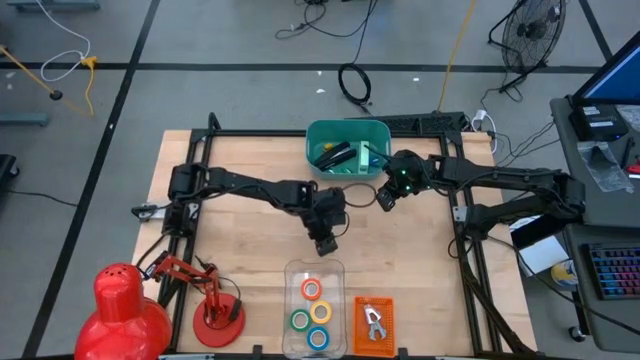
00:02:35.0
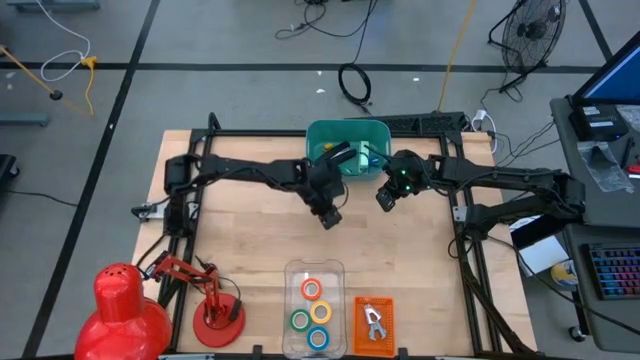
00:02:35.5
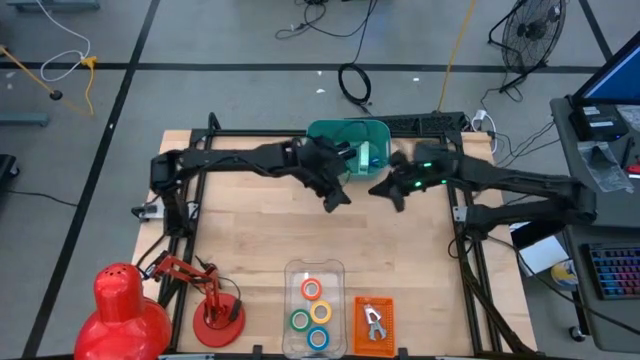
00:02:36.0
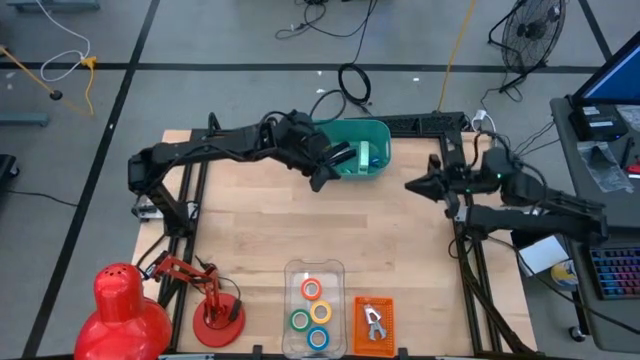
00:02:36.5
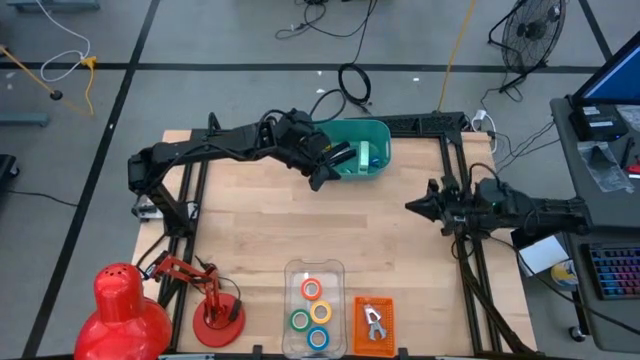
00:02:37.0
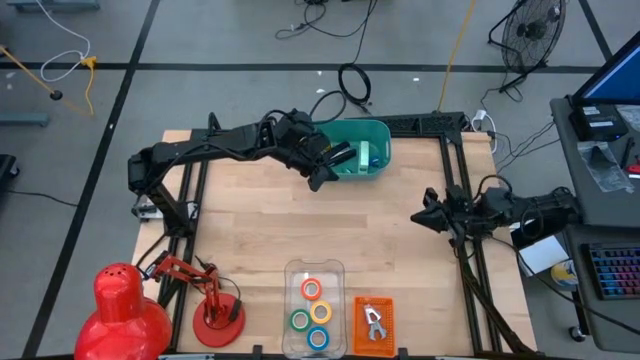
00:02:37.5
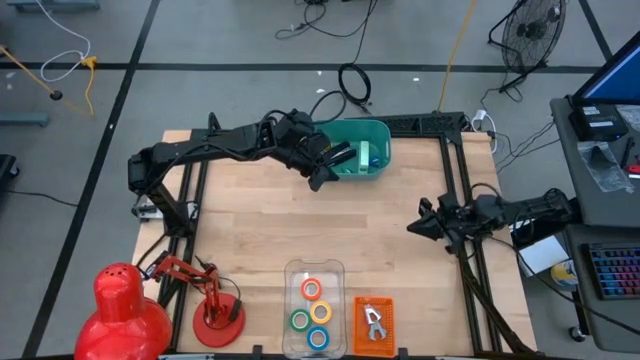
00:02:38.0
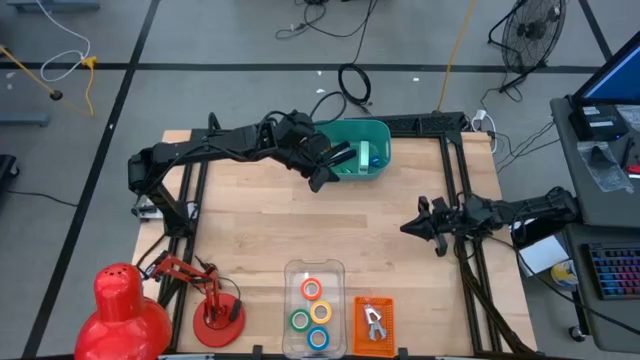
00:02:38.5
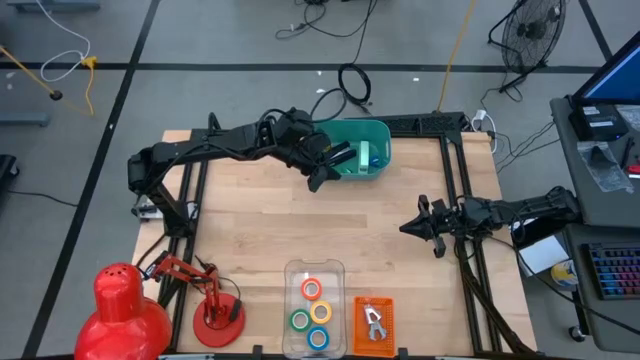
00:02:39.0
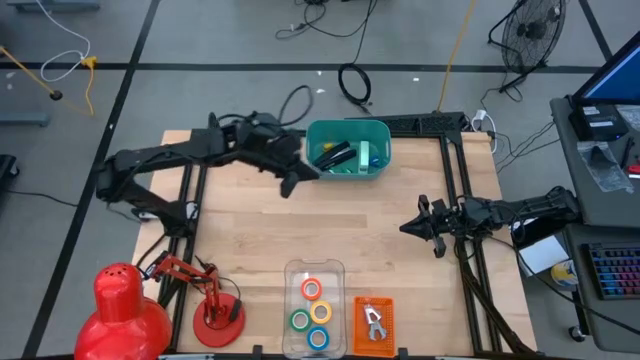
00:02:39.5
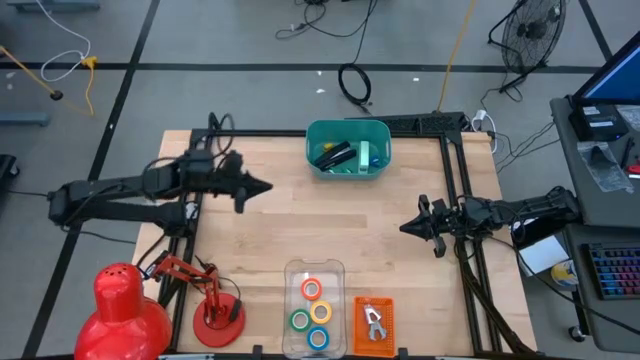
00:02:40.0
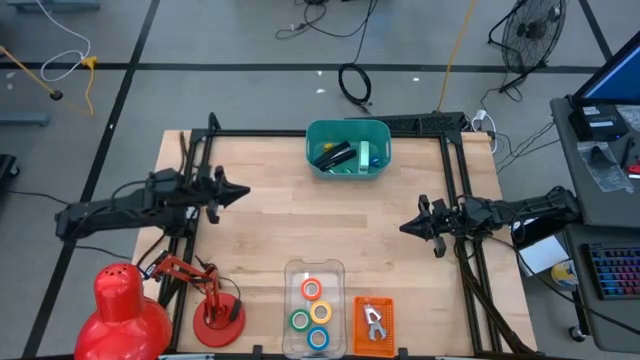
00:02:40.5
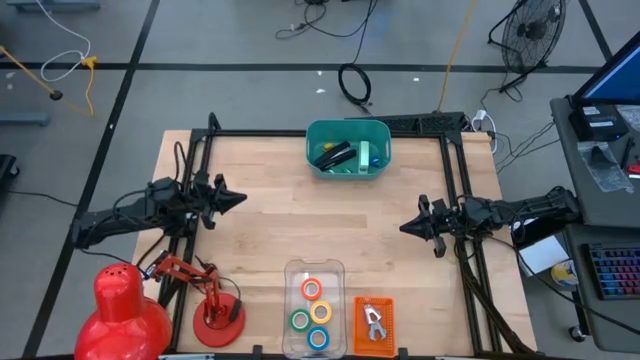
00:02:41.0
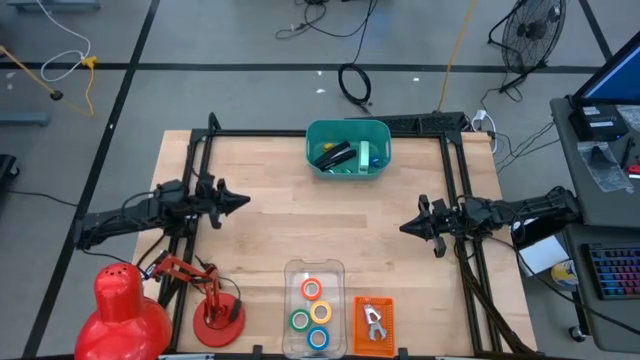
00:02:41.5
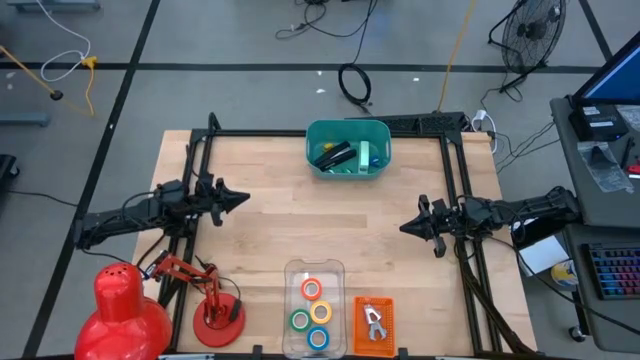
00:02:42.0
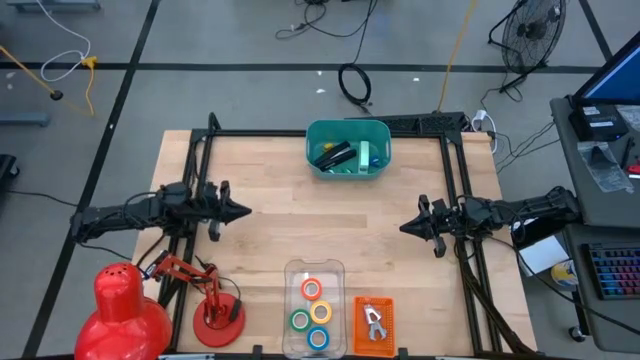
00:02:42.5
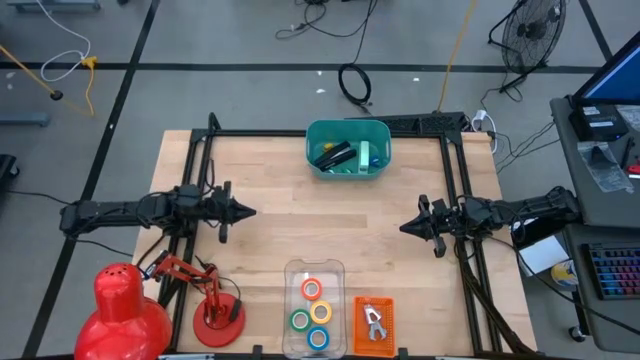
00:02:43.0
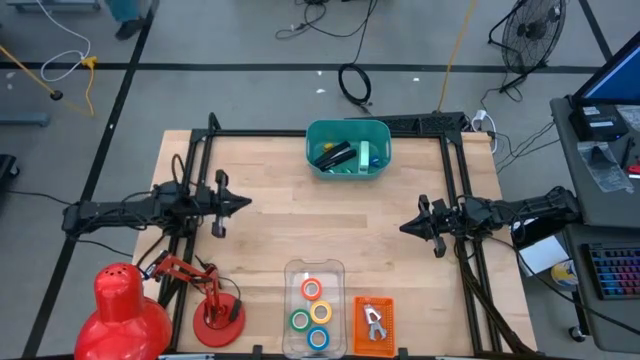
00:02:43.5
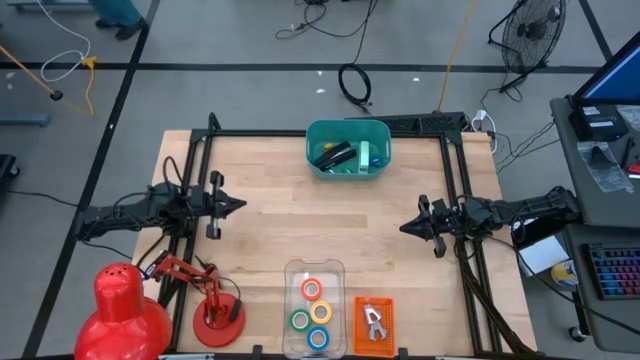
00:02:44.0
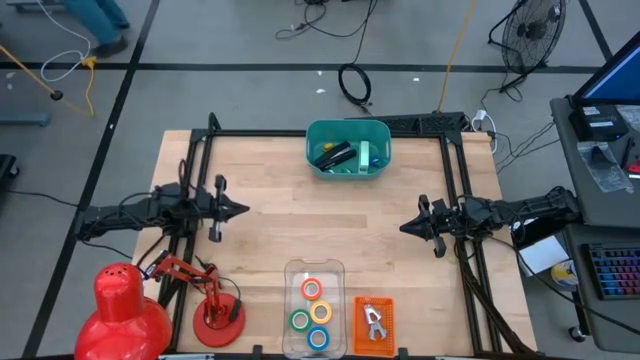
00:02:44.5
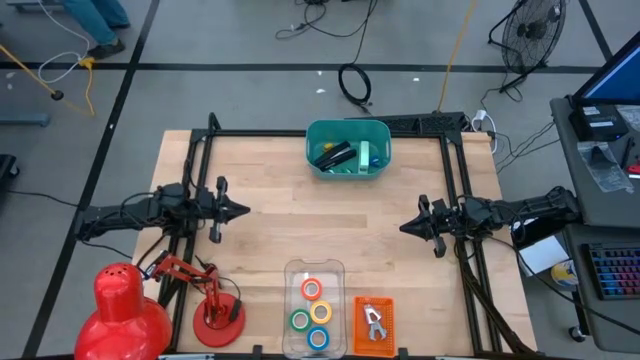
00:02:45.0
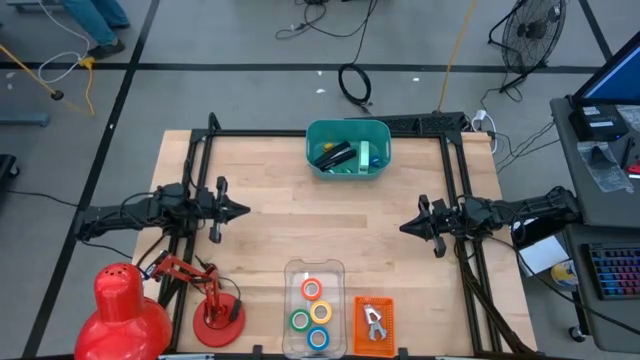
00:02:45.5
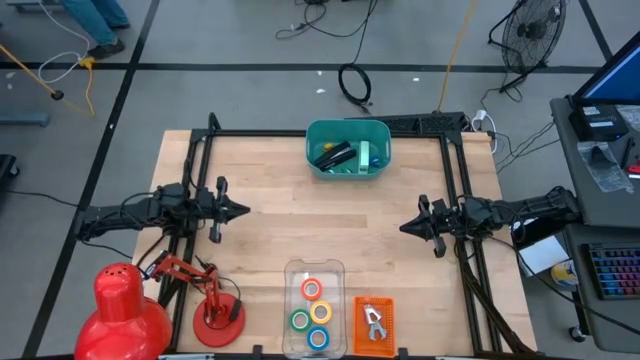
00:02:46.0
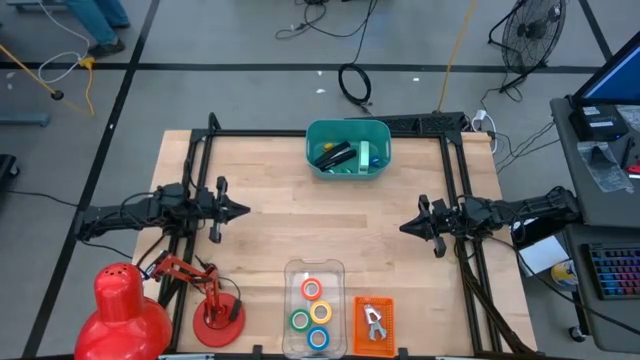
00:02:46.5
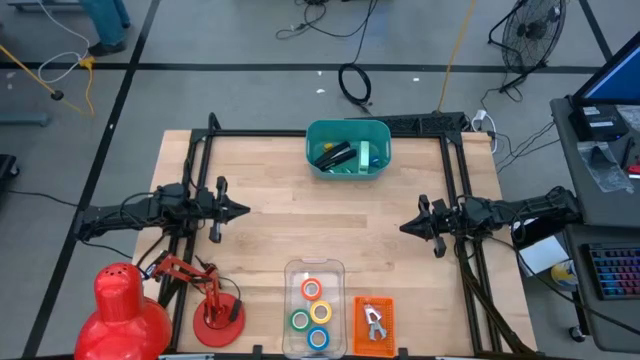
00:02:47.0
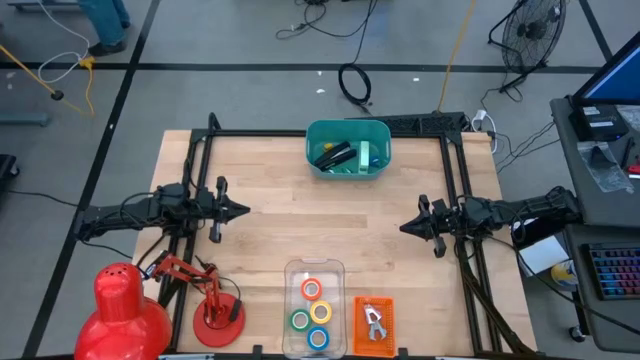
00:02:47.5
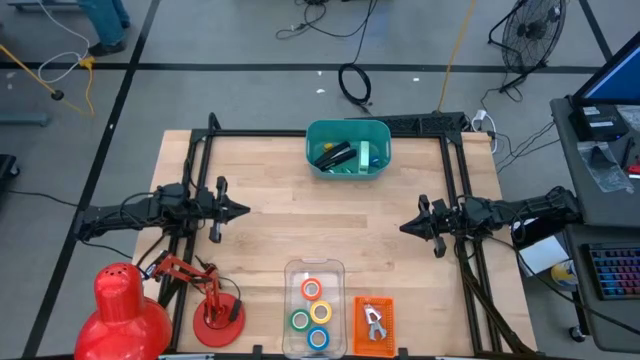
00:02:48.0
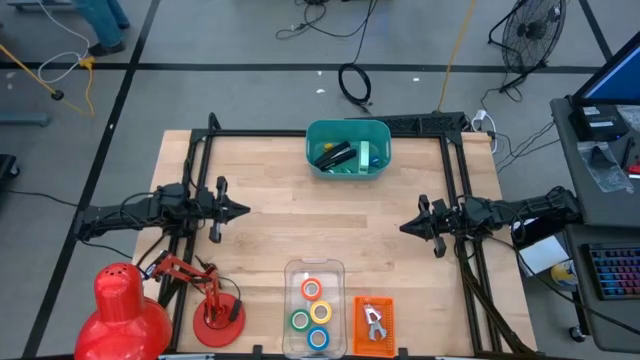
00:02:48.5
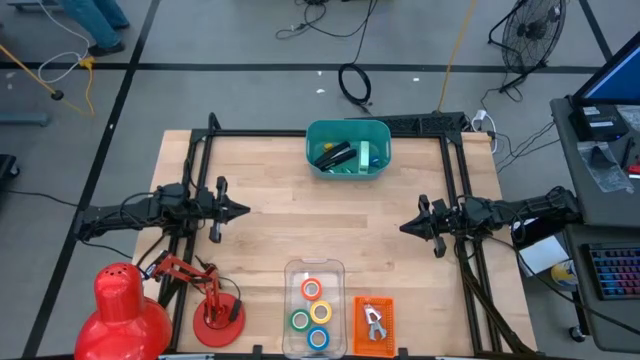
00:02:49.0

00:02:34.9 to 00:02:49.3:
Task: Pick and place Stapler, Stapler remover, tape
Return to Home Position

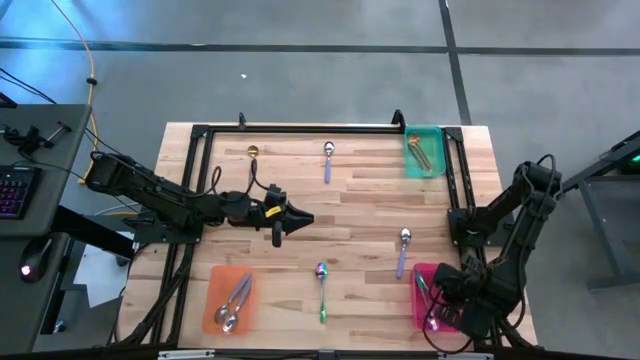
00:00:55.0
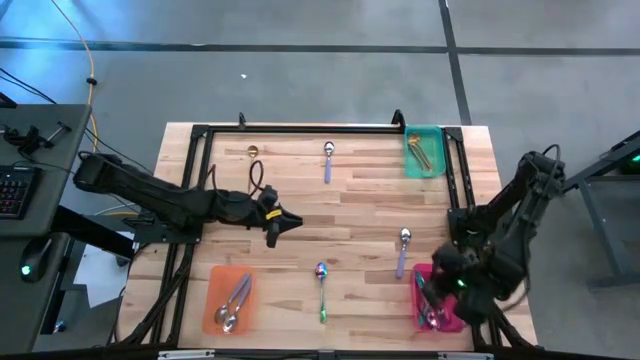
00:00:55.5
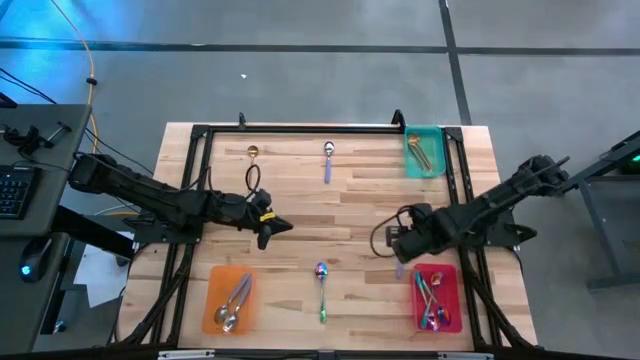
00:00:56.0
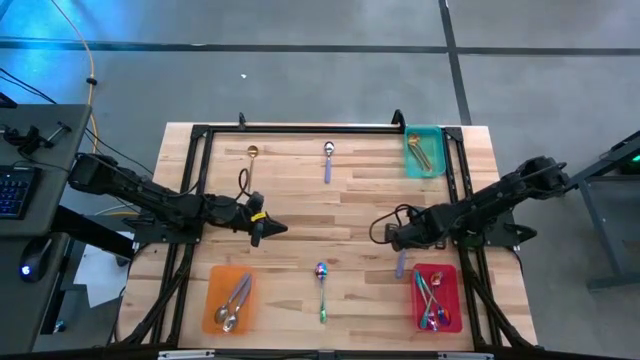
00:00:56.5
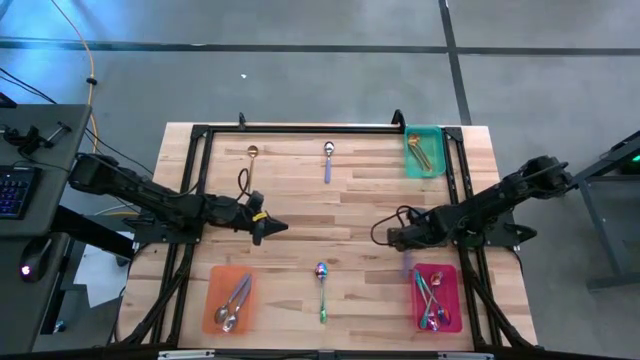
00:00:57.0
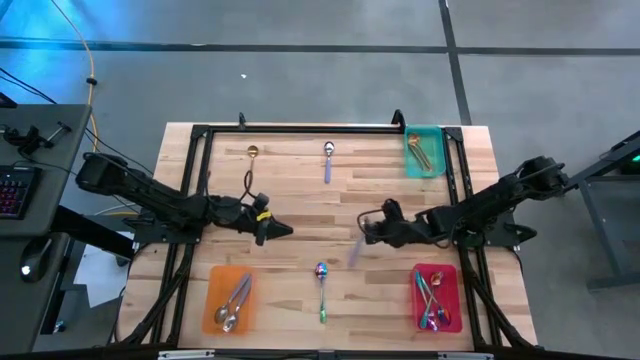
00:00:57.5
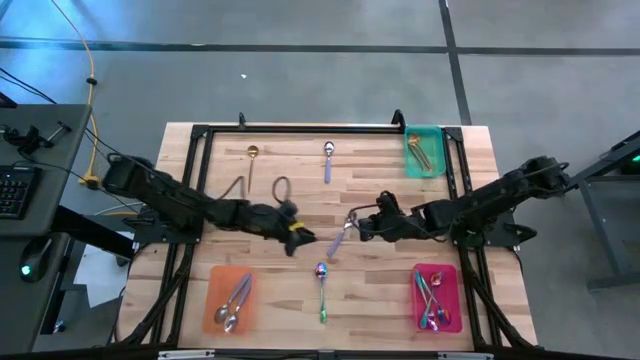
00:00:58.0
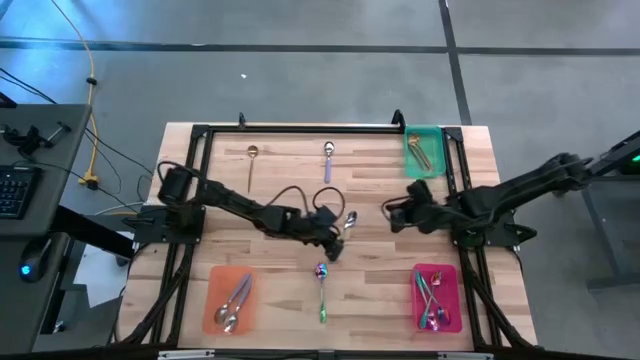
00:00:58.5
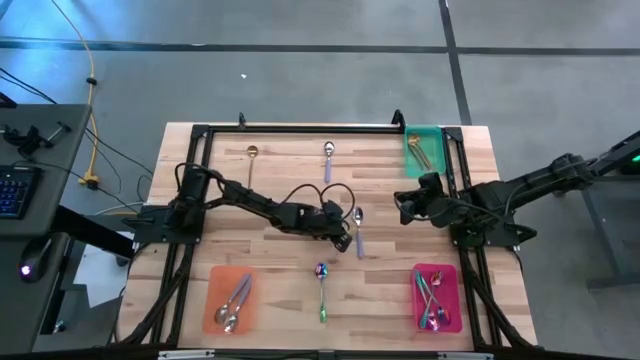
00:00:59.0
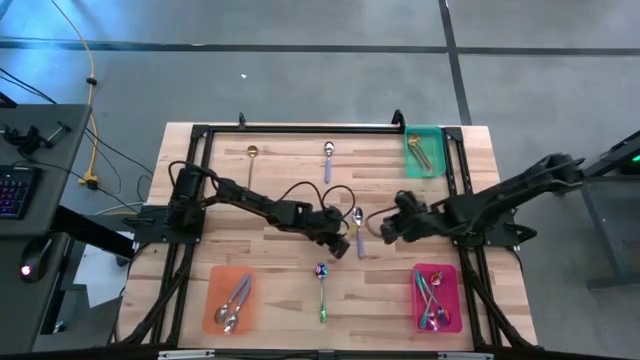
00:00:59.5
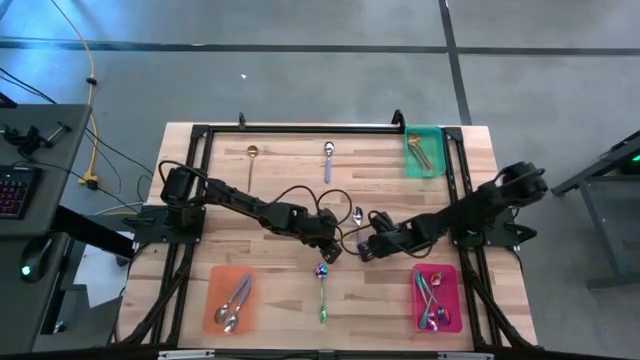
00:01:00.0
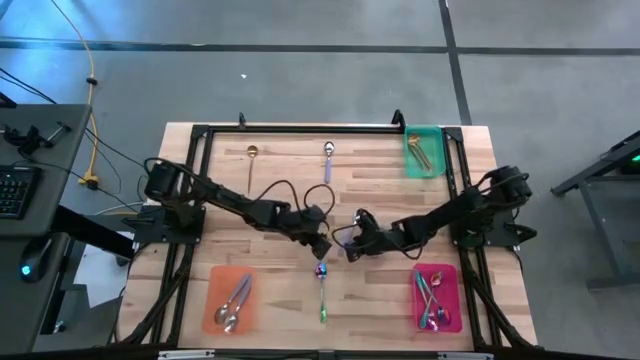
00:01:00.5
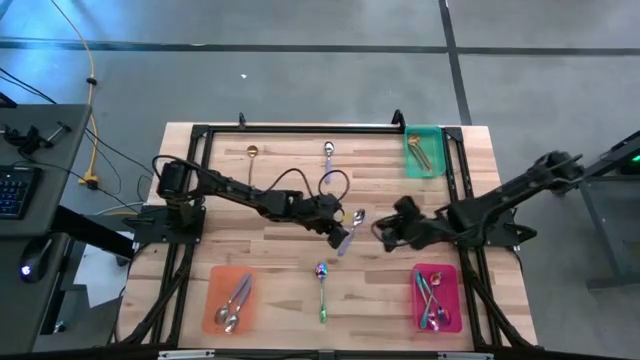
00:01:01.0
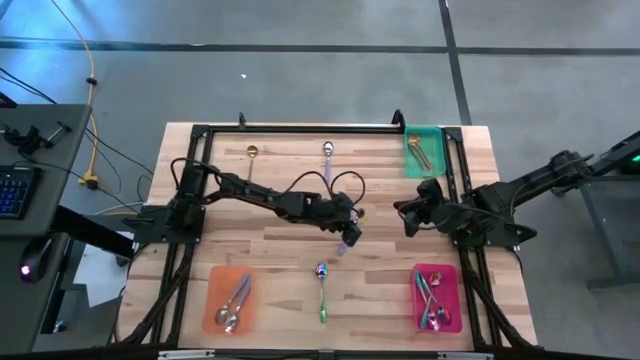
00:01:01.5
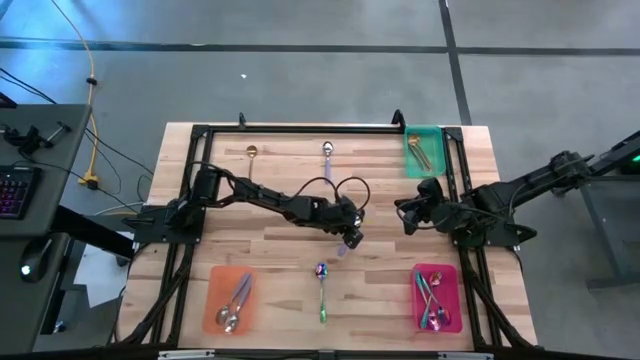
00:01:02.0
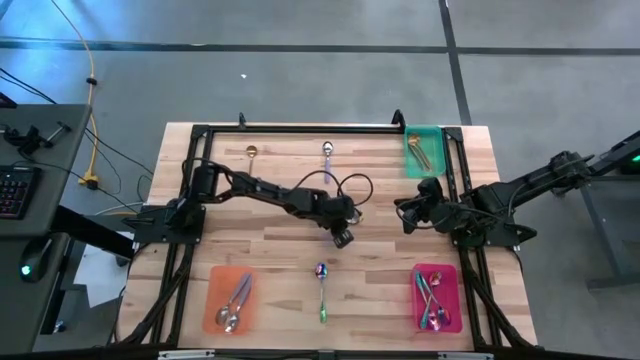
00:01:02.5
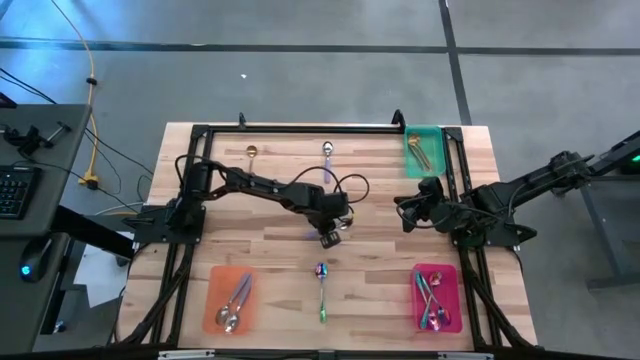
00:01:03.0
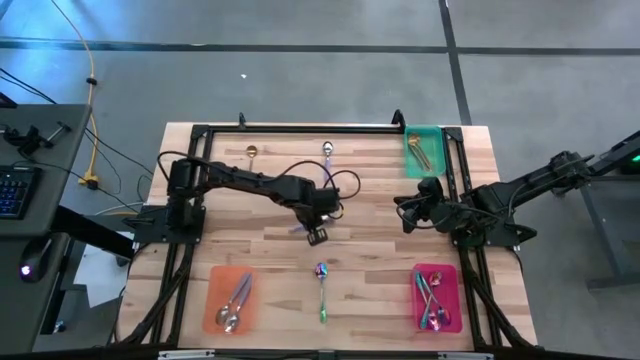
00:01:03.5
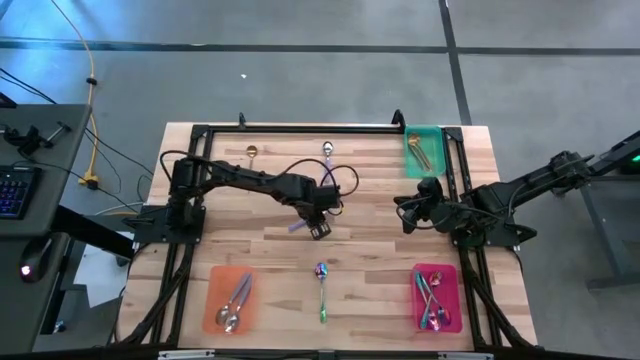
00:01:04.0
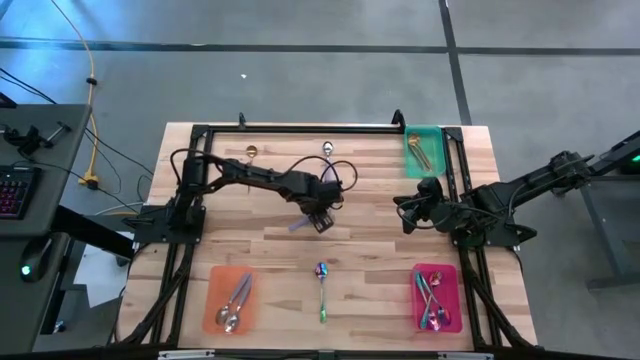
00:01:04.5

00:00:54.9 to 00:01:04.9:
Task: Sort silverware by color (type)
Put the purple spoon into the orange bin
